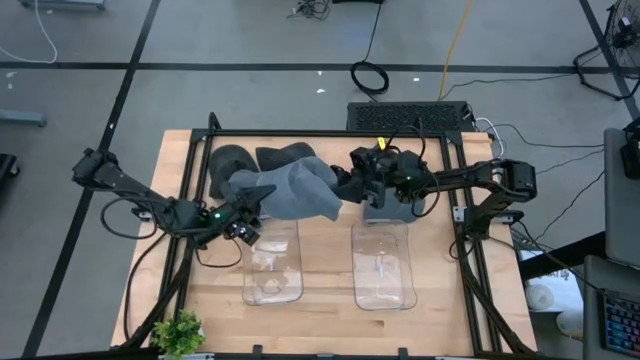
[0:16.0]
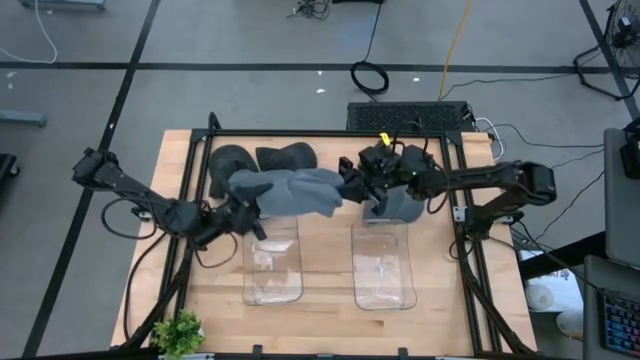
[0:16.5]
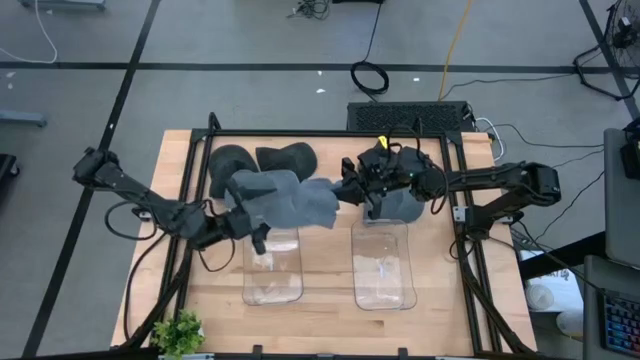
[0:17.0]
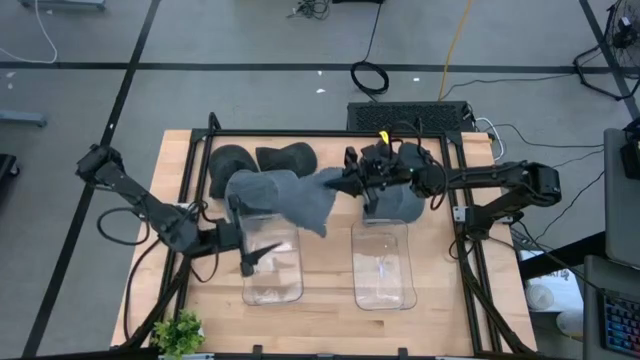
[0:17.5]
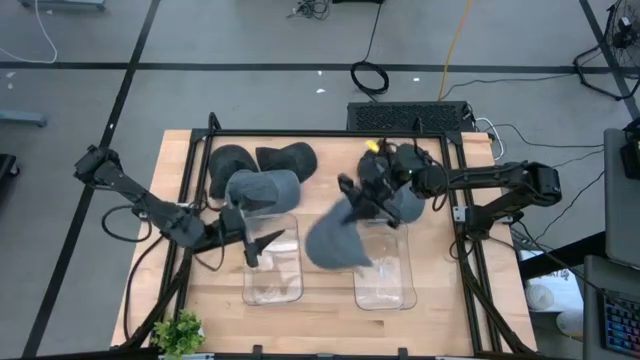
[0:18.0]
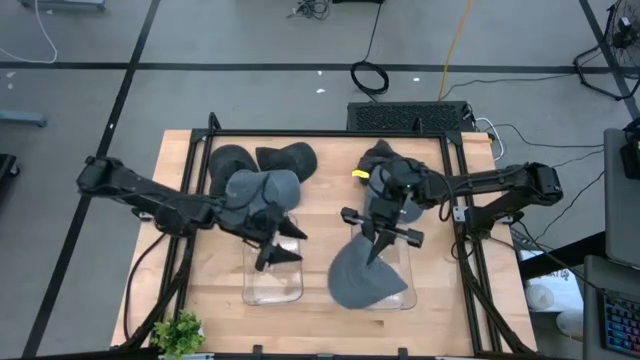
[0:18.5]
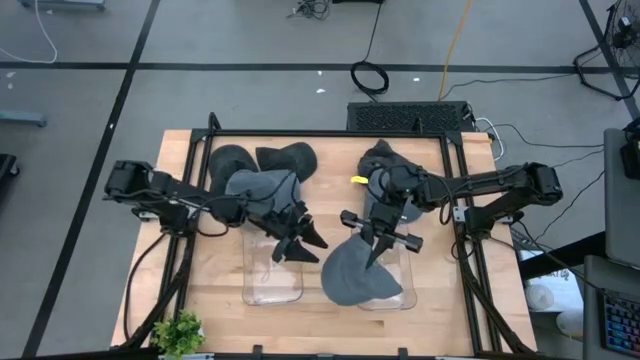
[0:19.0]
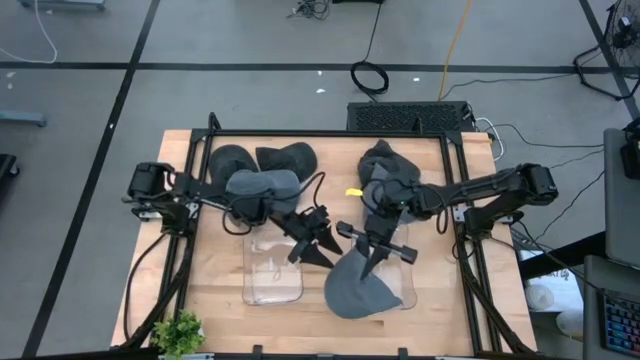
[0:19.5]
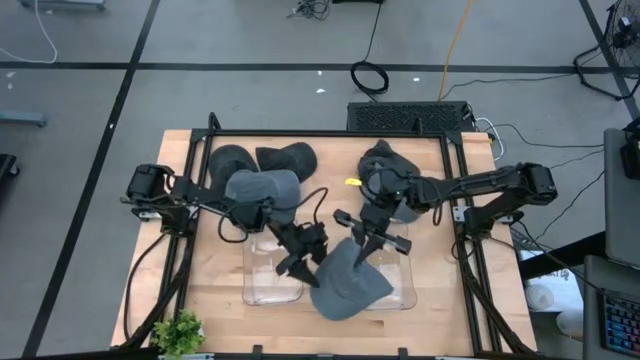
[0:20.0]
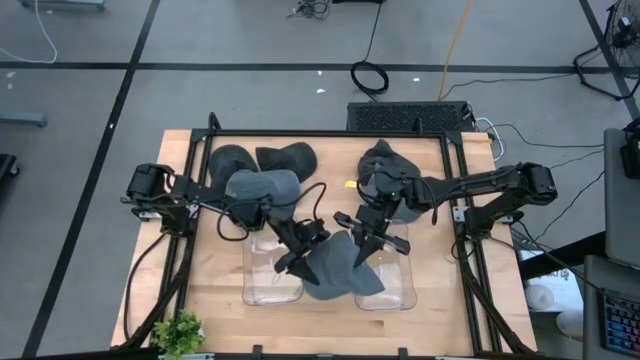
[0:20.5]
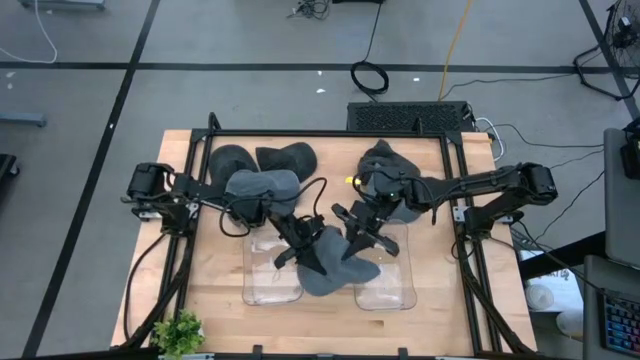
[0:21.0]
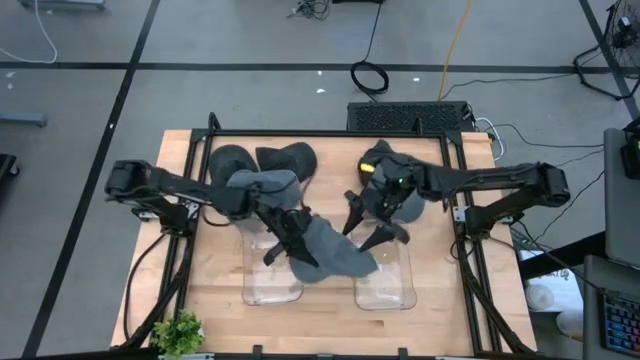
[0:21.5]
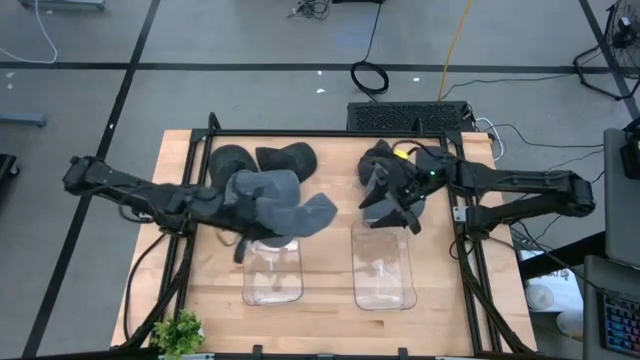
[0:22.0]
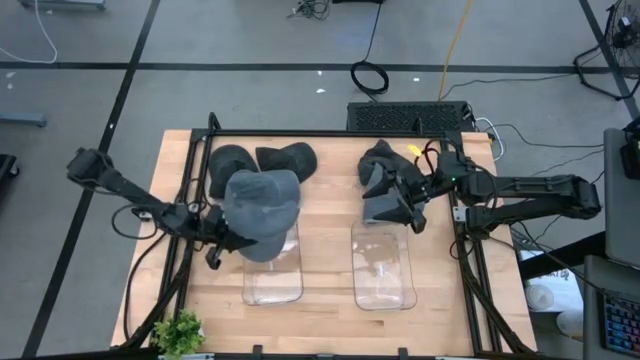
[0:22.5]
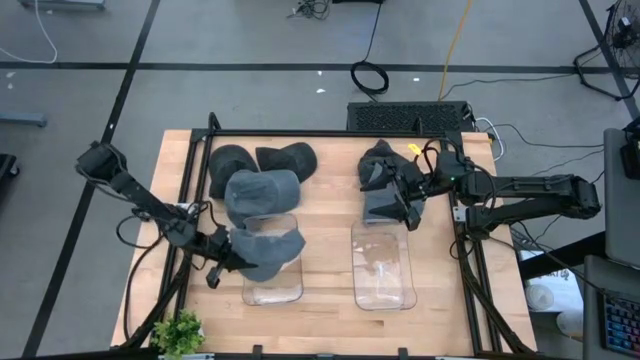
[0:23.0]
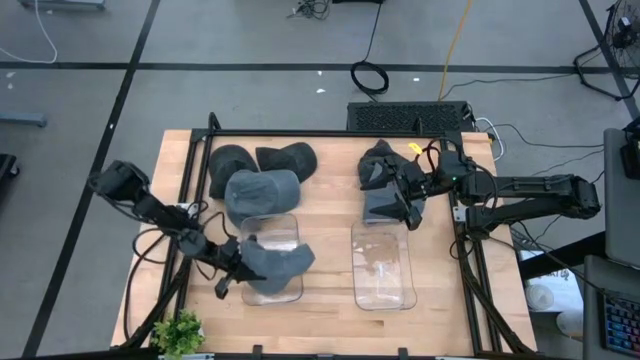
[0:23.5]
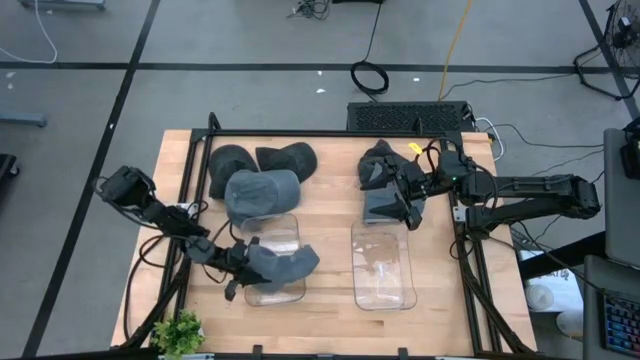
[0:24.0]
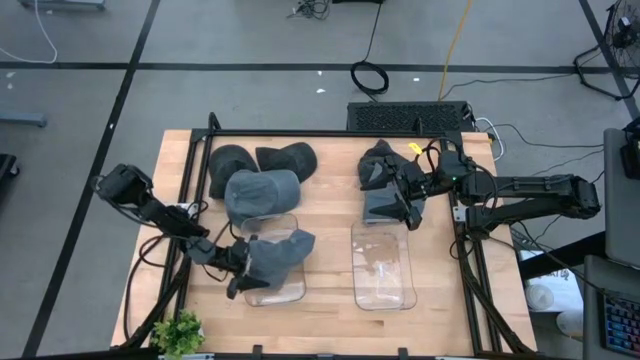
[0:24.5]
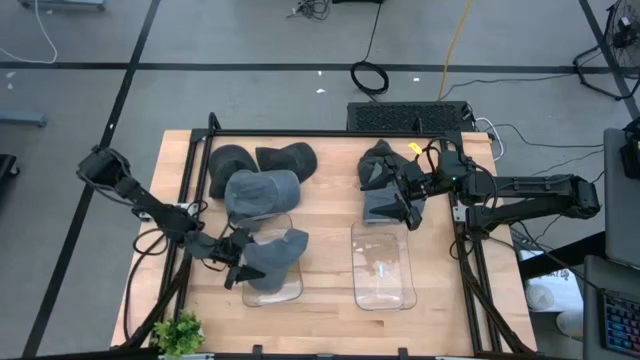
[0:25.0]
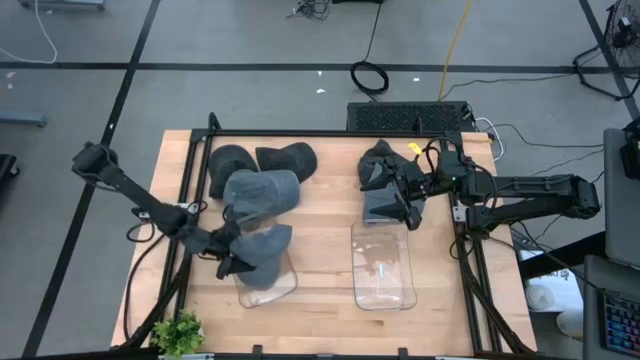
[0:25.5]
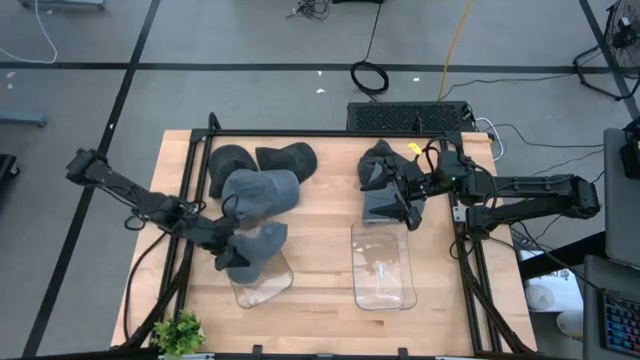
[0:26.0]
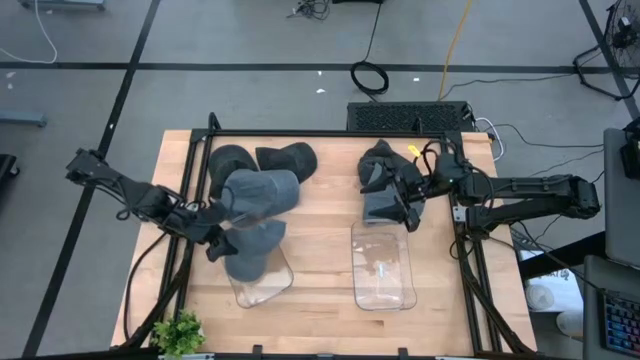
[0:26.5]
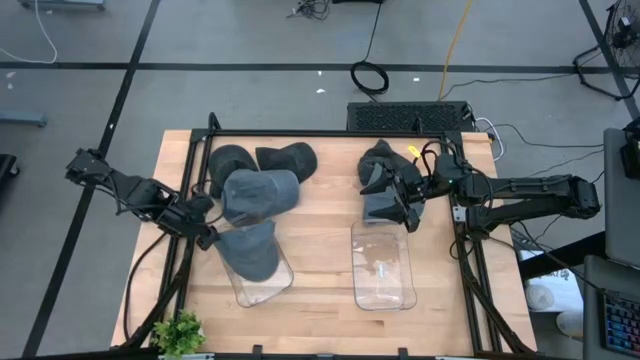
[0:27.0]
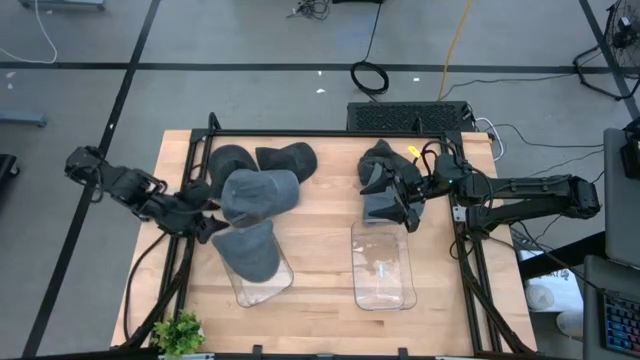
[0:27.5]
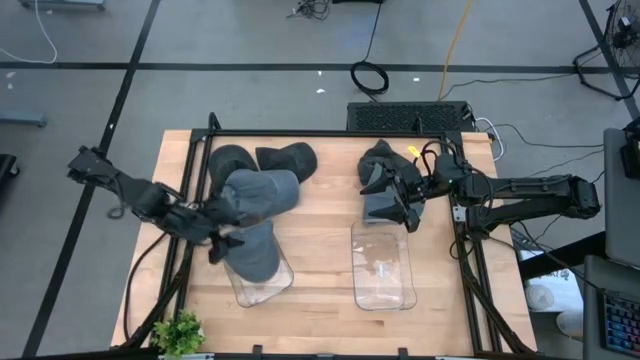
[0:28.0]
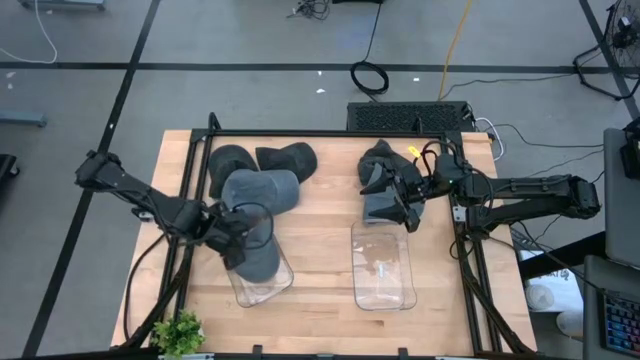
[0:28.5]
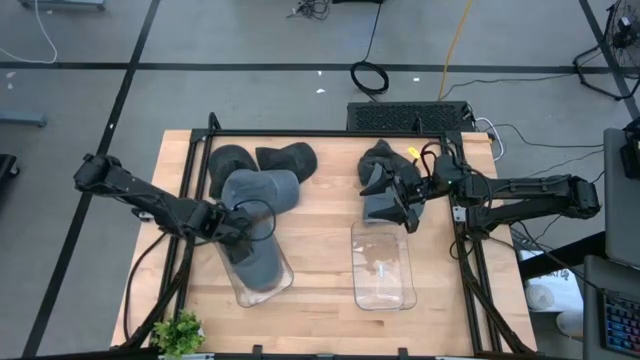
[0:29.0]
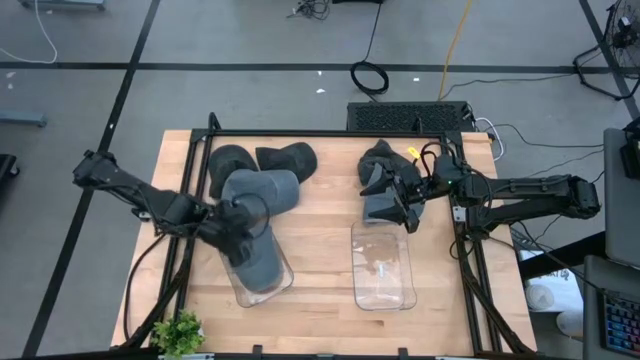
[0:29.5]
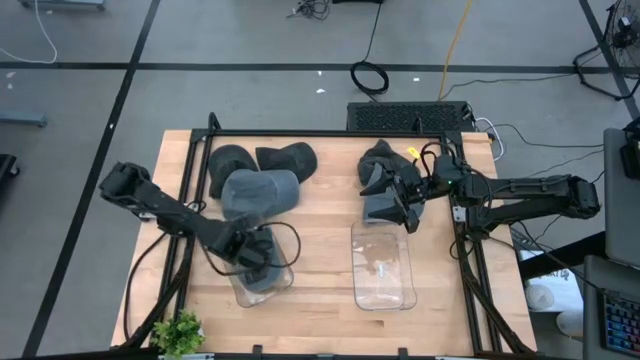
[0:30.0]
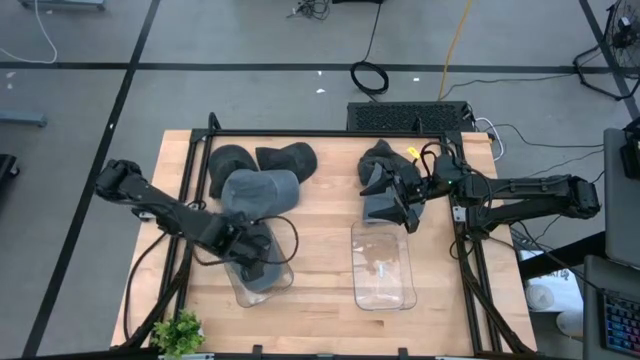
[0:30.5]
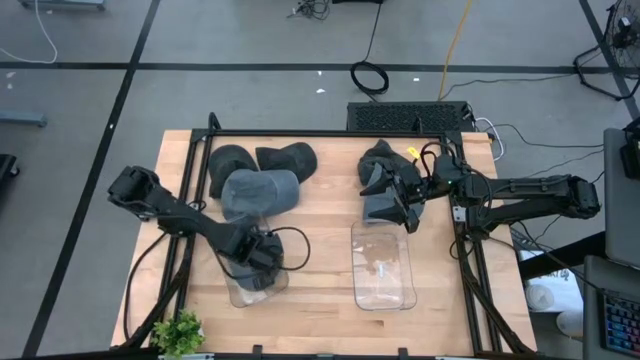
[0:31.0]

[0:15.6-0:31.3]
Task: Pick & Place hat
Put the top gray cap into the left transparent bin

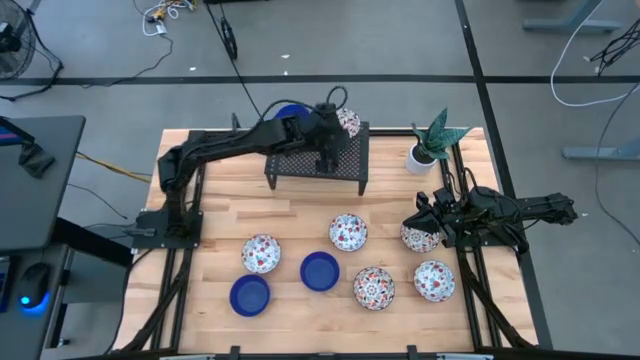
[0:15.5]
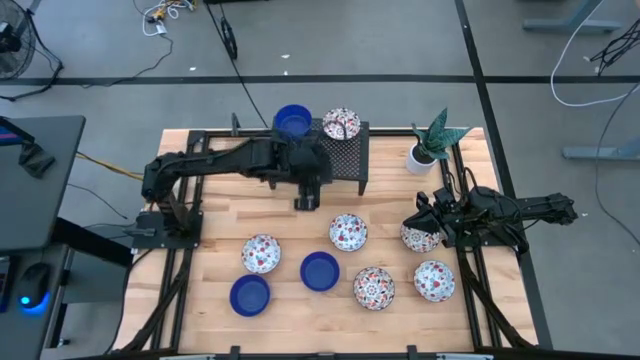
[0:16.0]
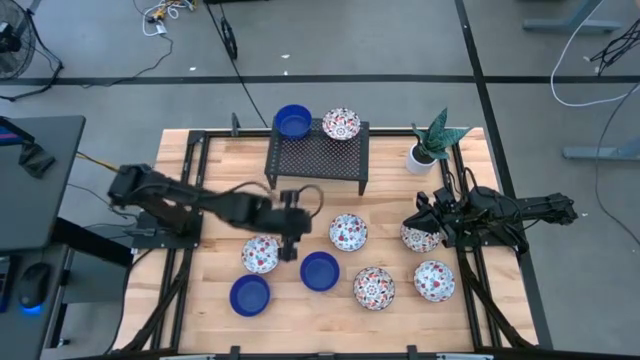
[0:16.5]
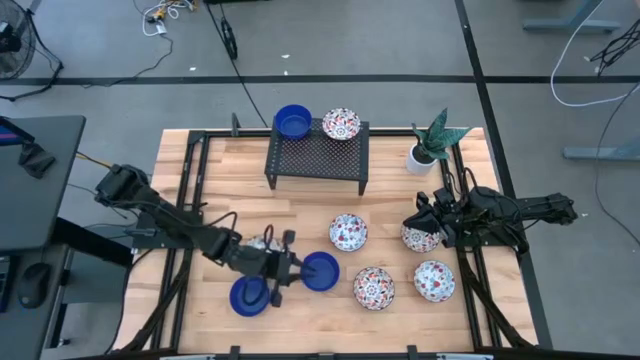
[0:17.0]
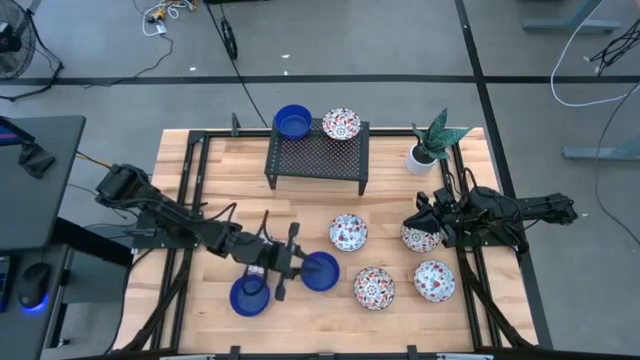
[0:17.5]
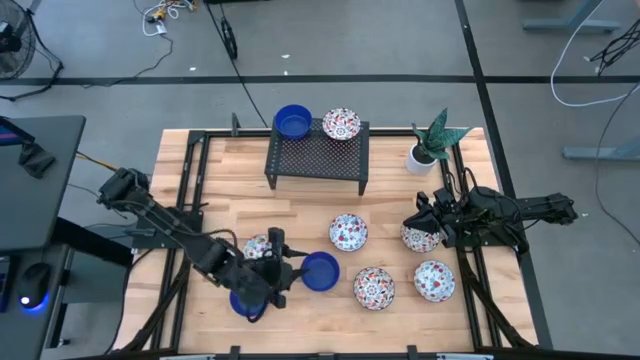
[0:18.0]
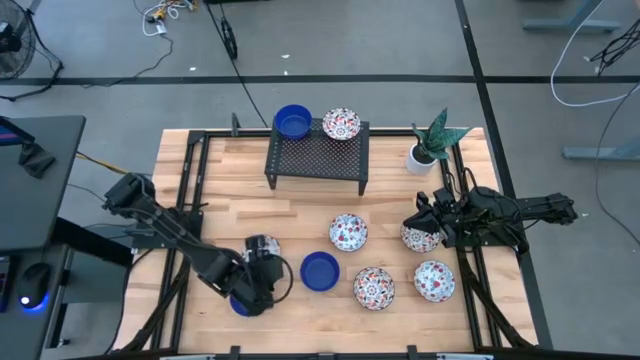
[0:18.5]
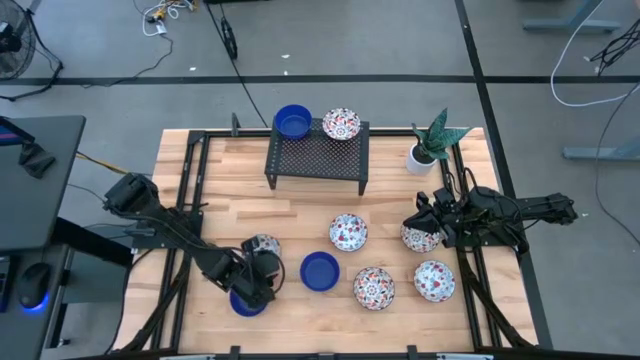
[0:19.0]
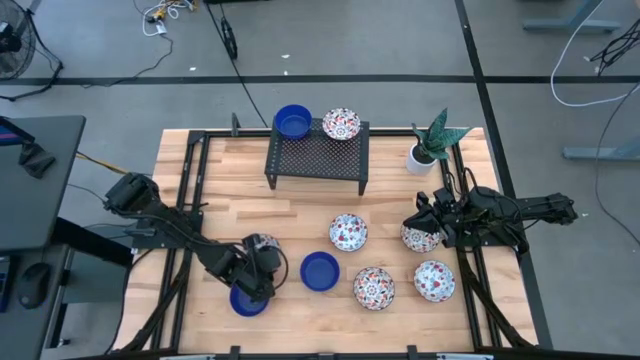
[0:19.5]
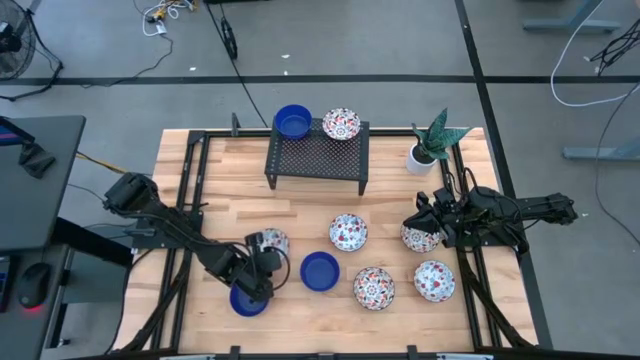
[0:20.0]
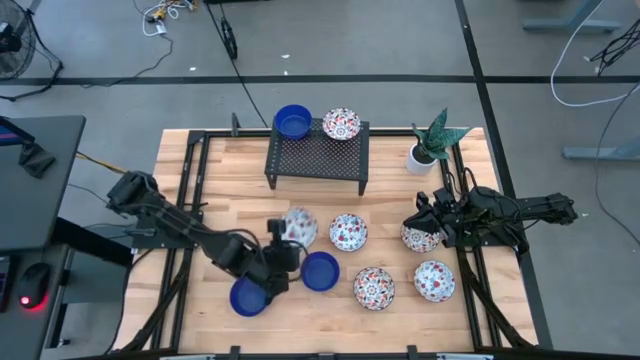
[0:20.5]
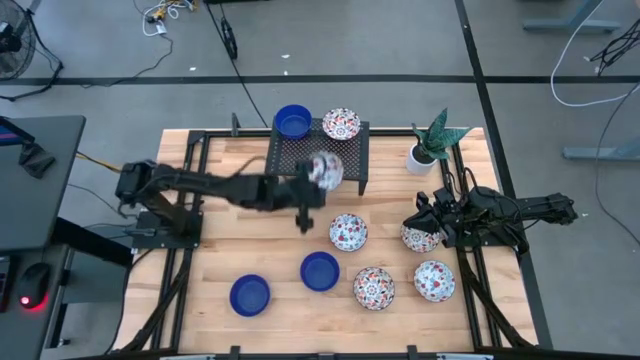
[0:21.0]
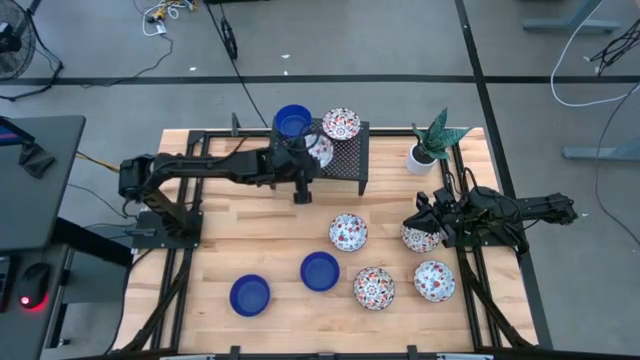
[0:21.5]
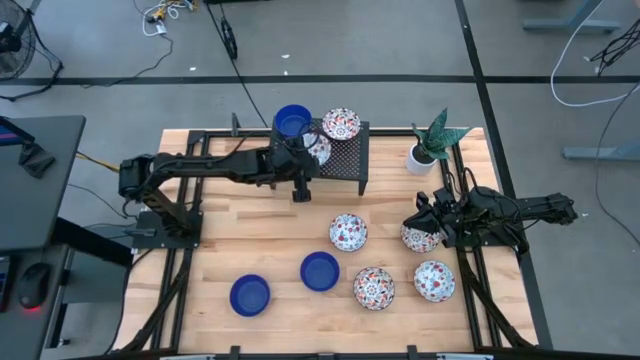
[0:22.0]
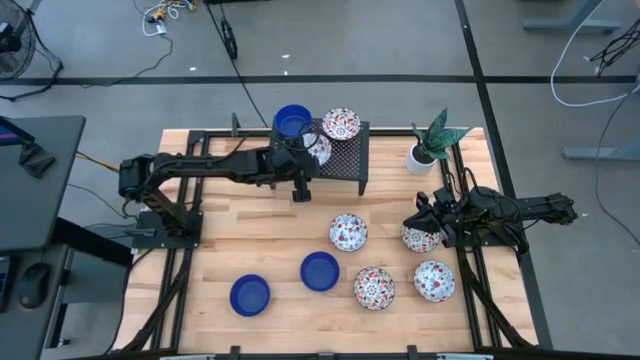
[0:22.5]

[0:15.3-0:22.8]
Task: Pick & Place Mini bowls
Put the left red bowl on the shelf
